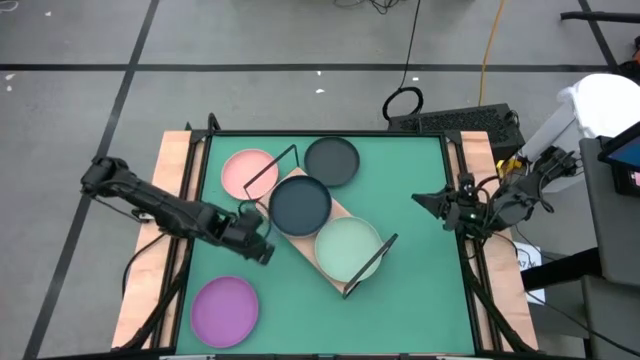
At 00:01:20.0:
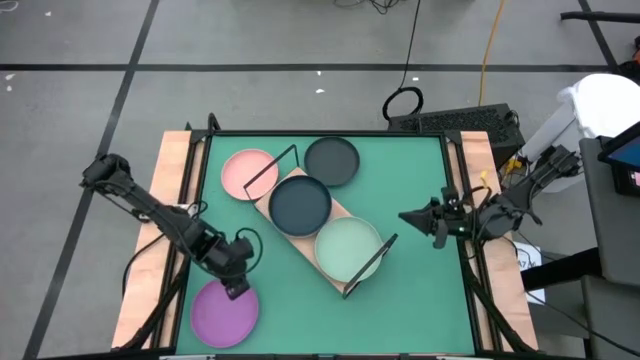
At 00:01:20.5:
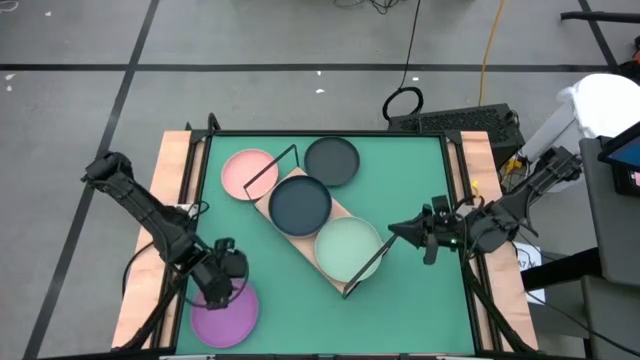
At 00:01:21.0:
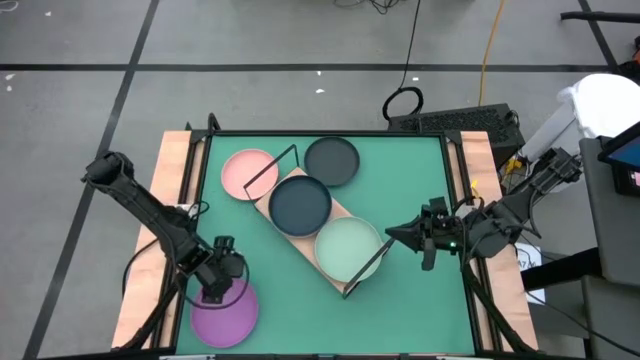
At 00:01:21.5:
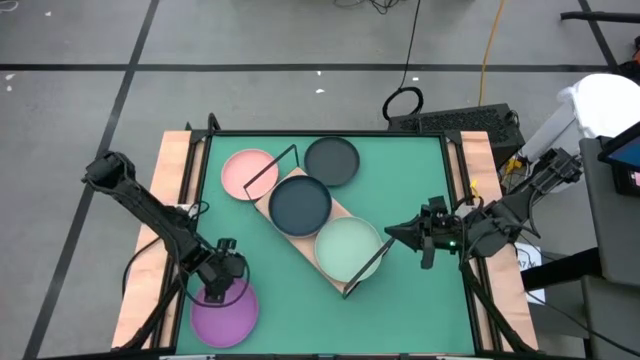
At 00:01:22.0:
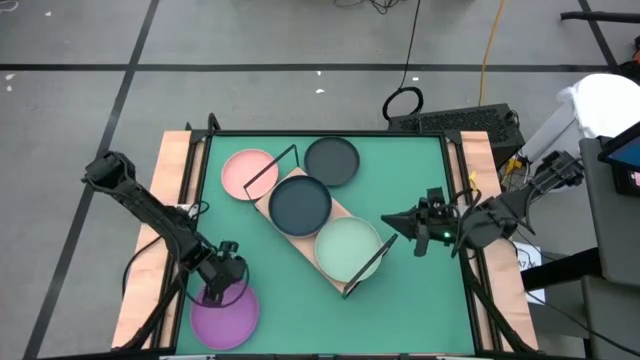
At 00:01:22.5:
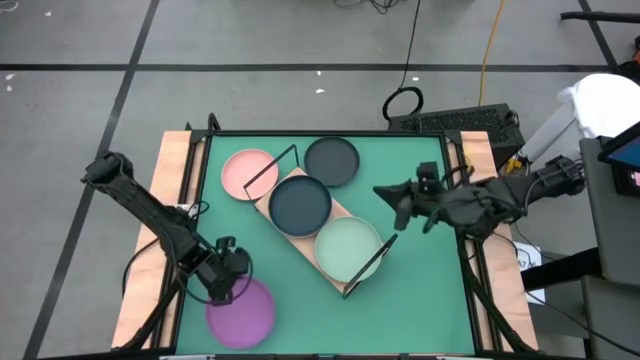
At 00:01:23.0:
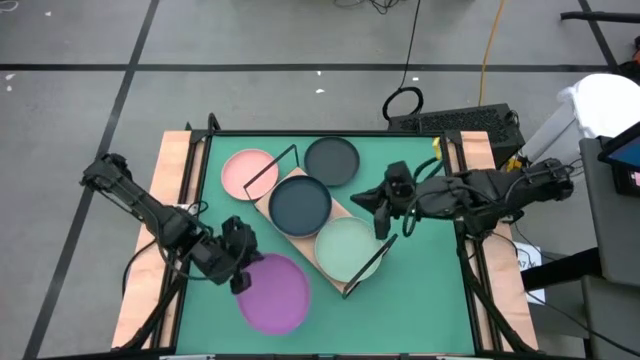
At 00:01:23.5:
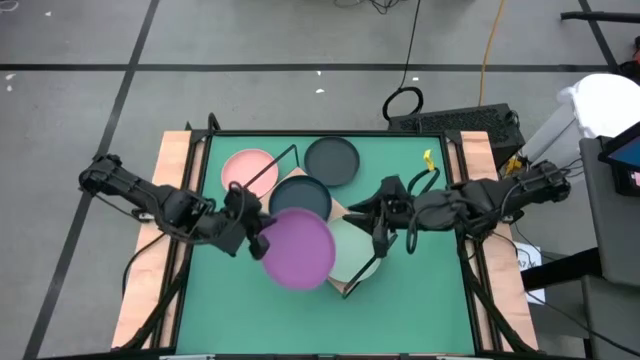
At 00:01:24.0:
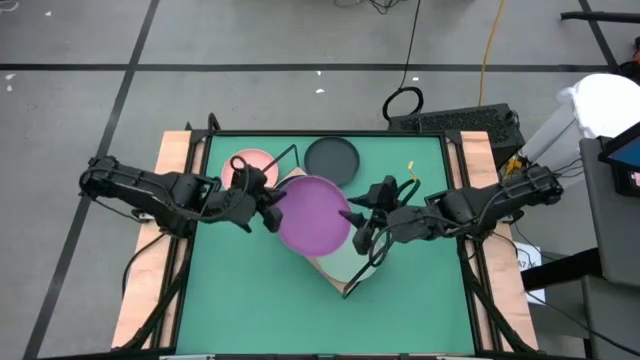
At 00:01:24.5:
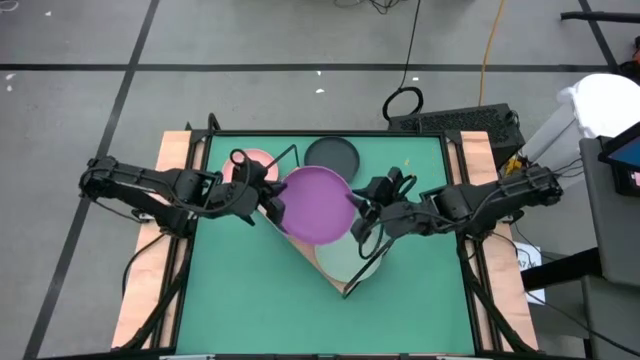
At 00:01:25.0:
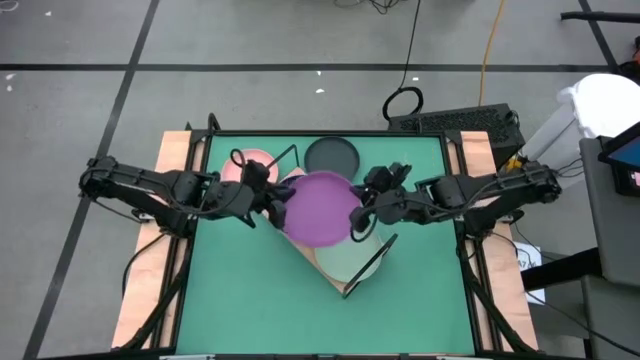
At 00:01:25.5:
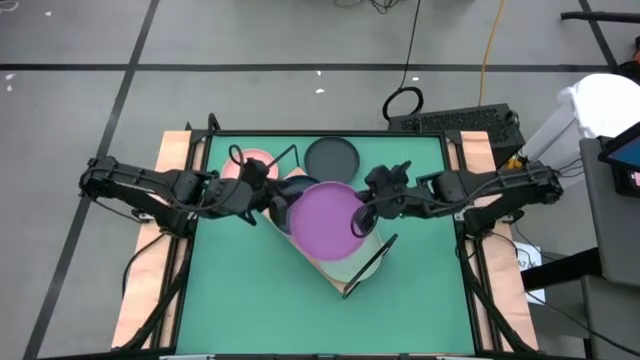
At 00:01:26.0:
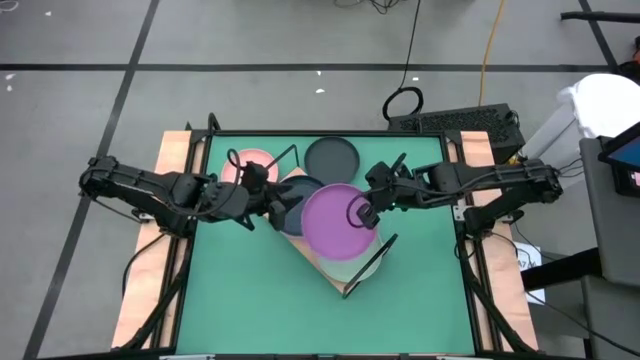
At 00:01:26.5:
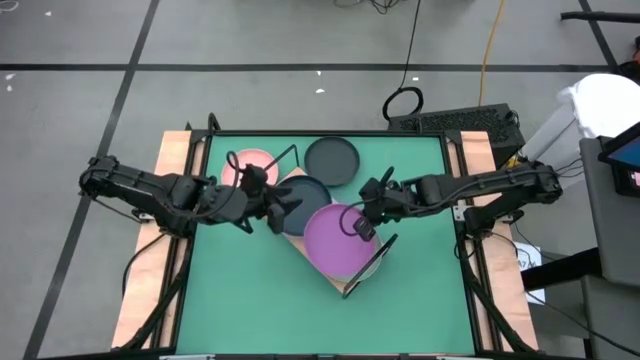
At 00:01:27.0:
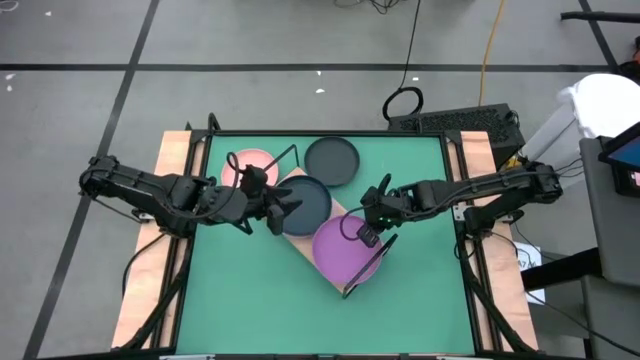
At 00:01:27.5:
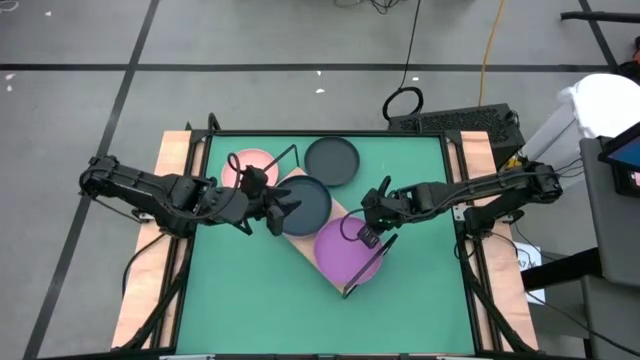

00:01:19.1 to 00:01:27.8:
Task: Place and stack plates onto a shelf
Stack the violet plate on the green plate on the shelf

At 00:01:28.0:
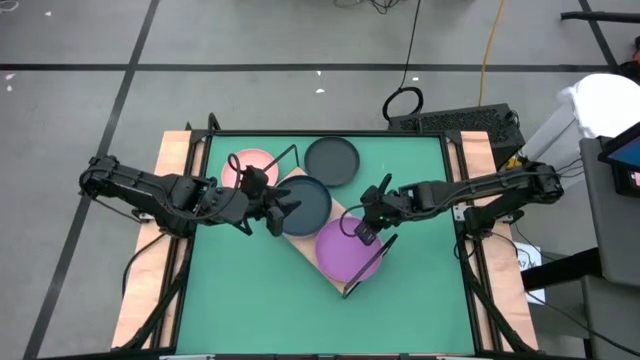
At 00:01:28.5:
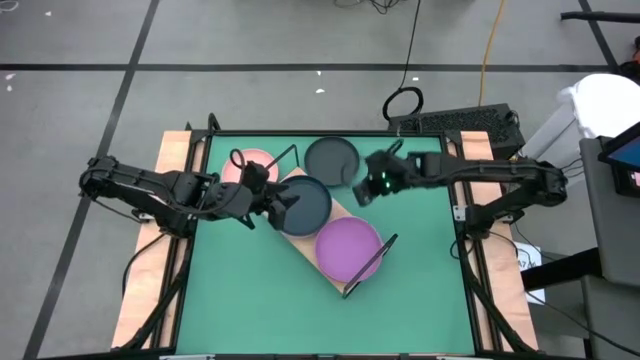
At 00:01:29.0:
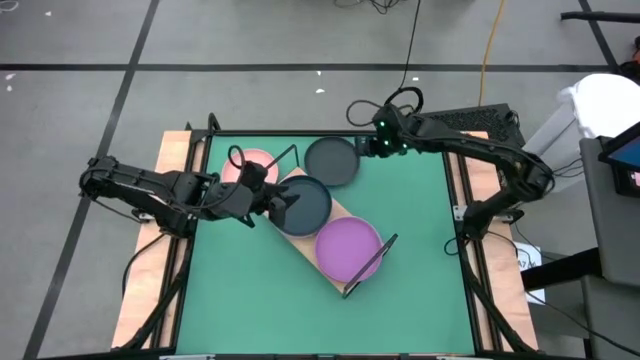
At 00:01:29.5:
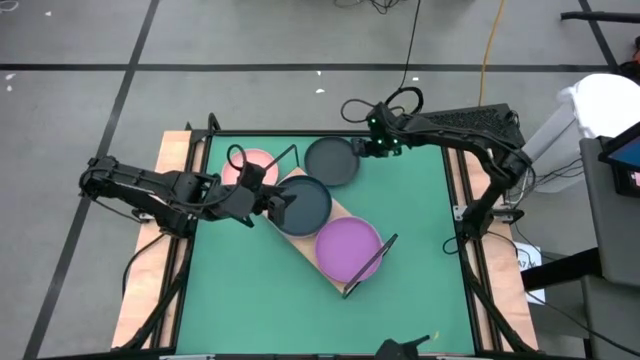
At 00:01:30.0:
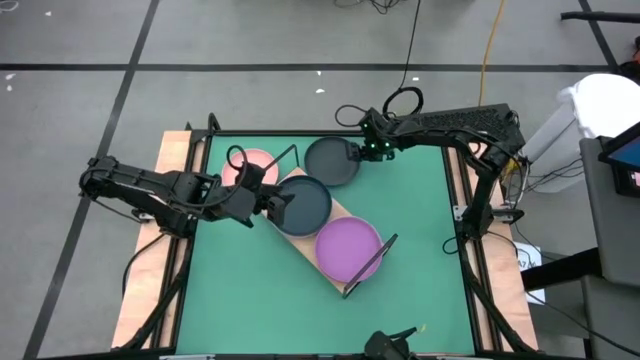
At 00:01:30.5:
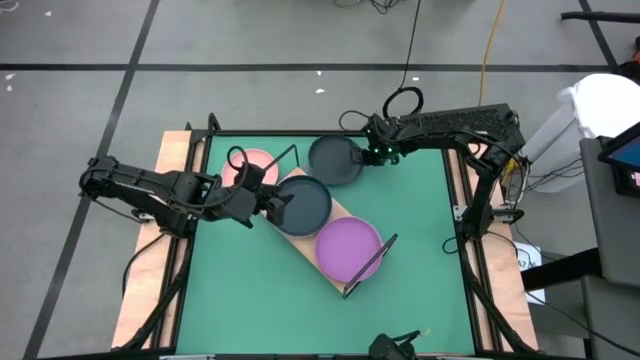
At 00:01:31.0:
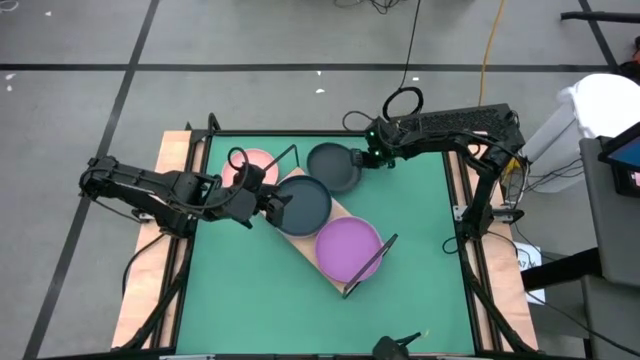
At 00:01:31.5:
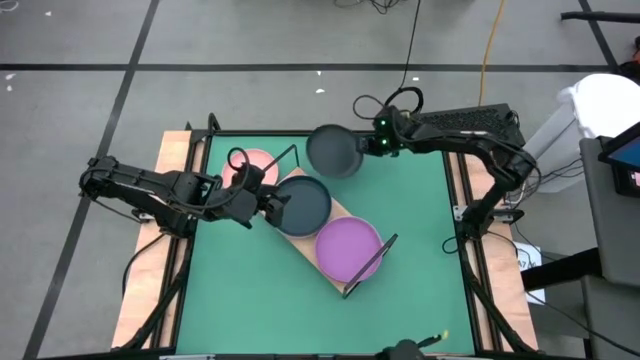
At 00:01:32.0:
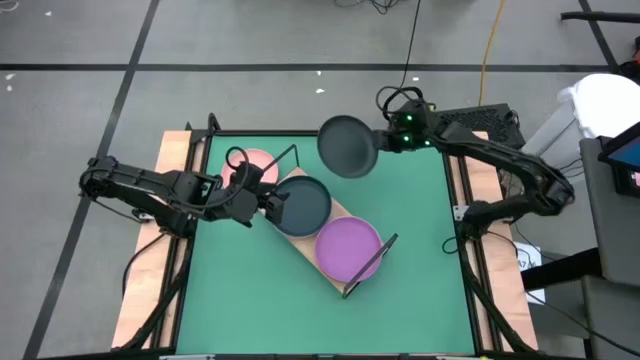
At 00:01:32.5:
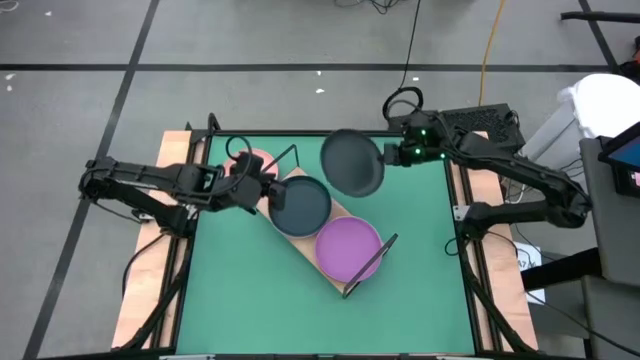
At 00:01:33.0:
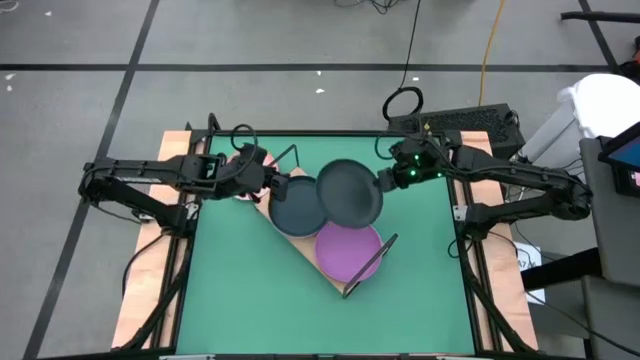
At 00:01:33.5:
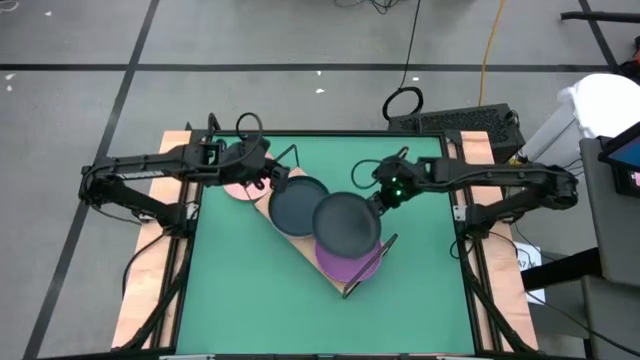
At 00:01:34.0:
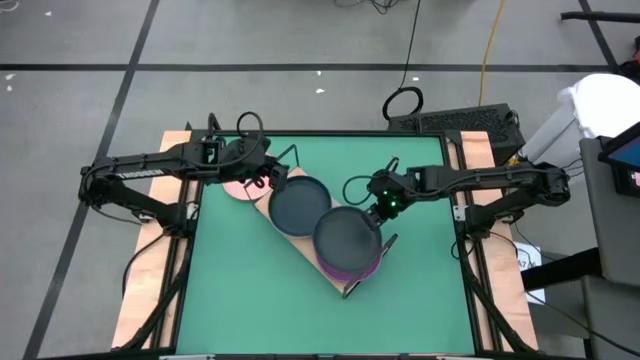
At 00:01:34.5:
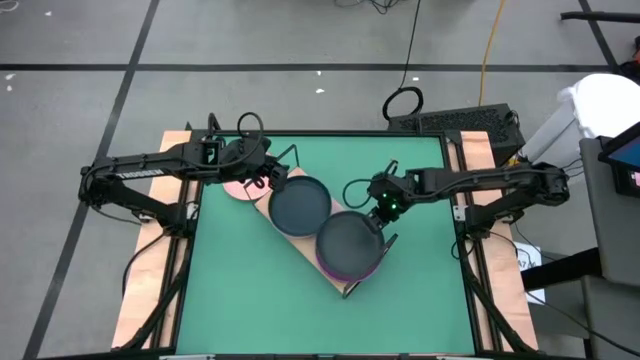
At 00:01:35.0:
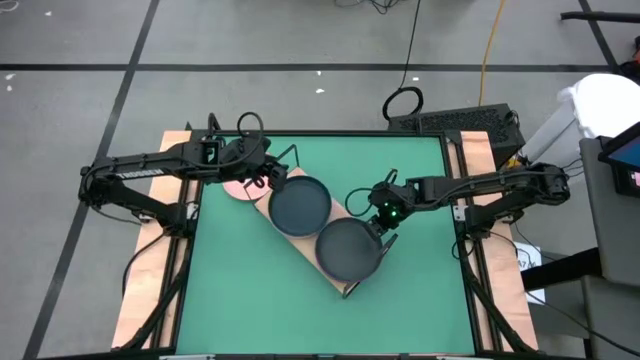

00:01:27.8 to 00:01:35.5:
Stack the black plate on the violet plate on the shelf
